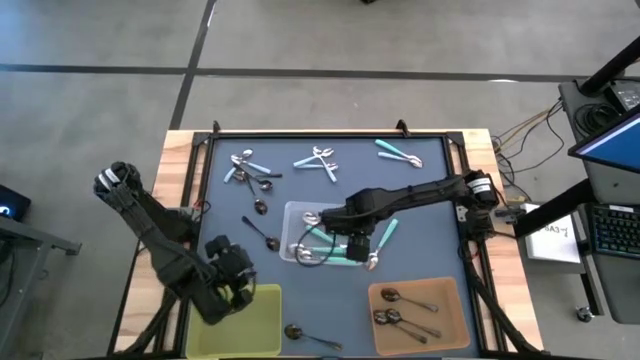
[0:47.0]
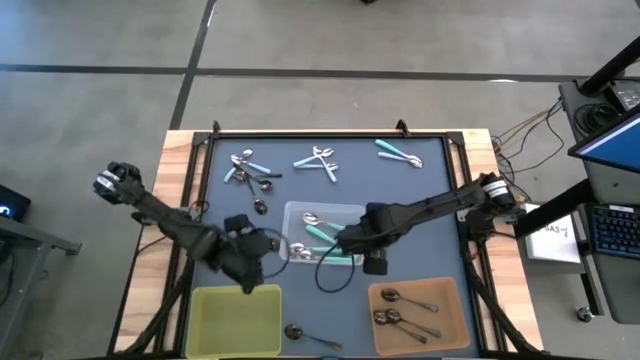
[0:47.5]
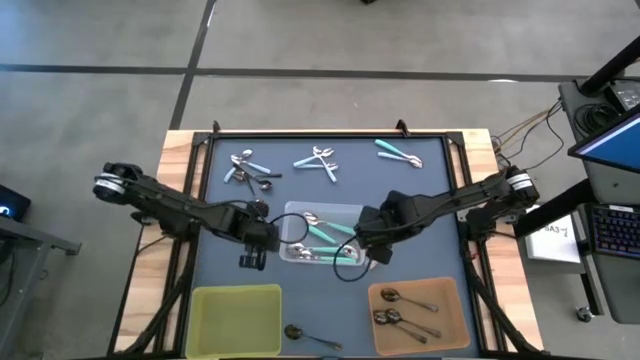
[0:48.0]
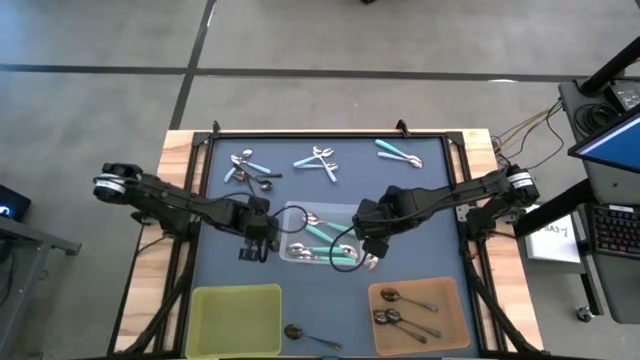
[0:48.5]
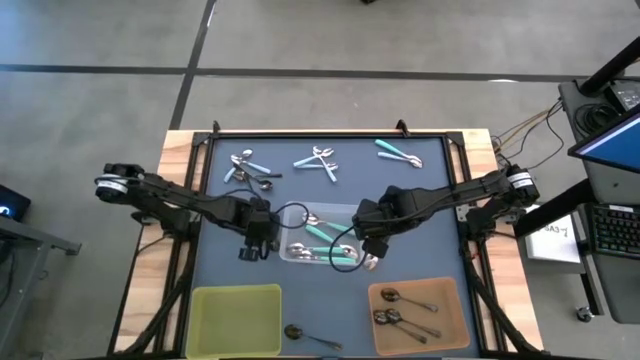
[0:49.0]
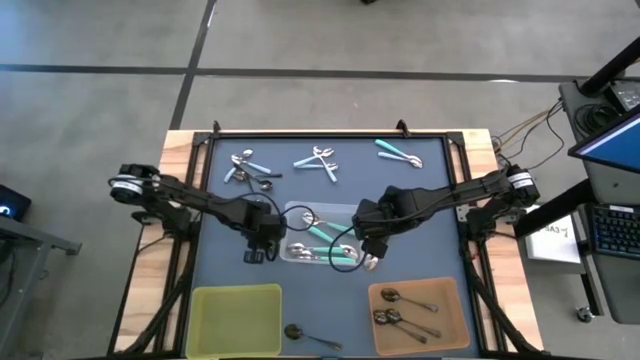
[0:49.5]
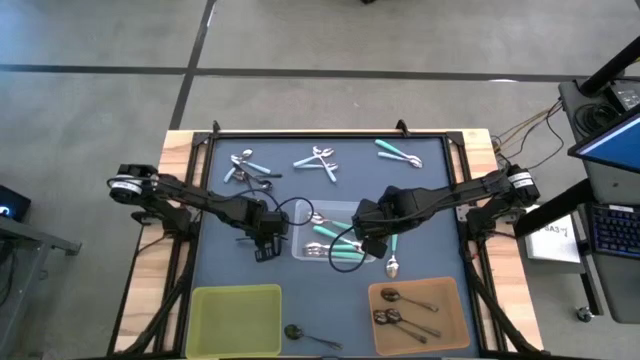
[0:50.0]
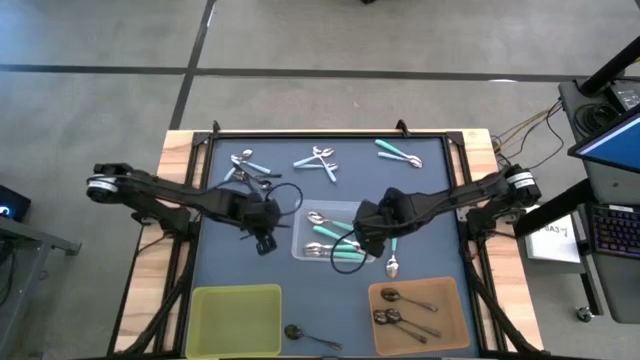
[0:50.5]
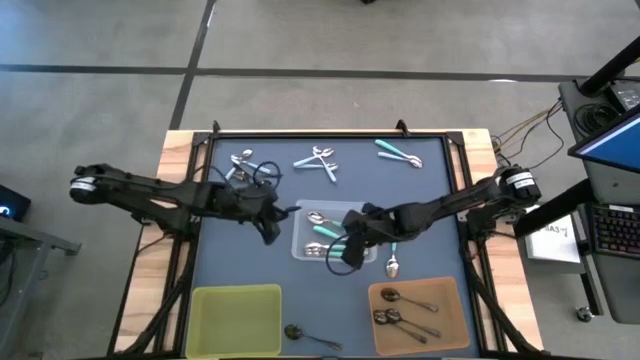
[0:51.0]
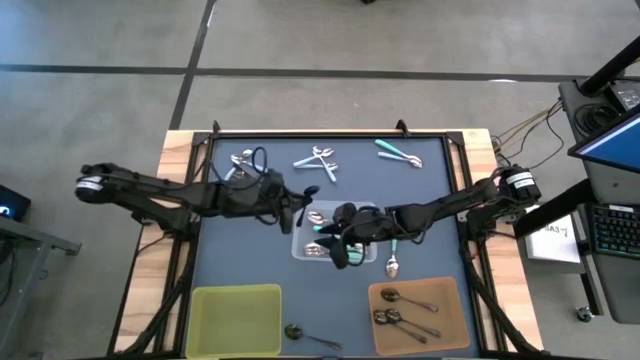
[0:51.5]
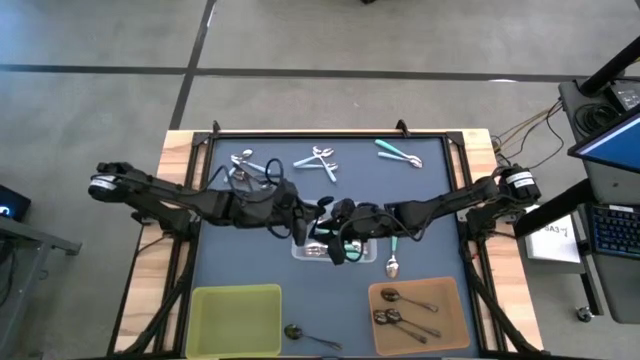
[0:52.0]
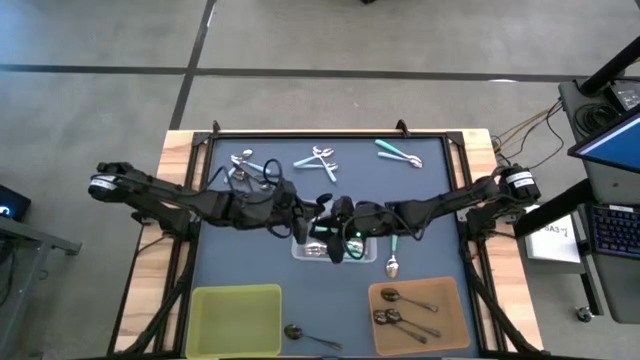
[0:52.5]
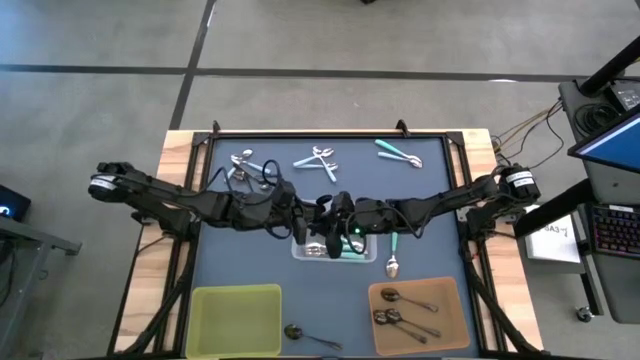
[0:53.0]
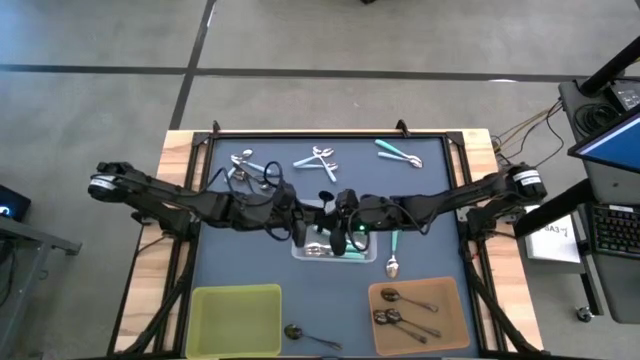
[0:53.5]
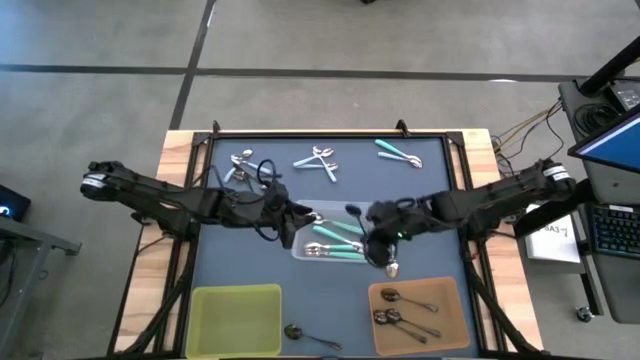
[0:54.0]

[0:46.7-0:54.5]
Task: Sort silverware by color (type)
Put the black spoon into the orange bin

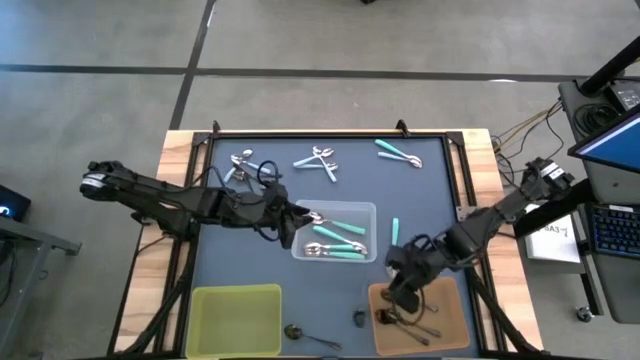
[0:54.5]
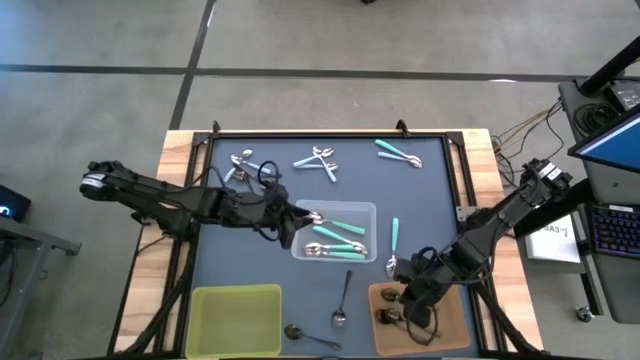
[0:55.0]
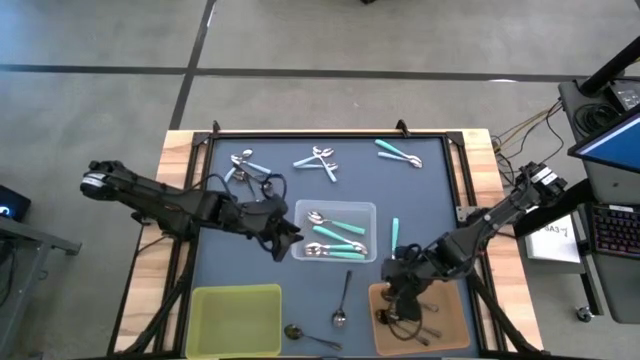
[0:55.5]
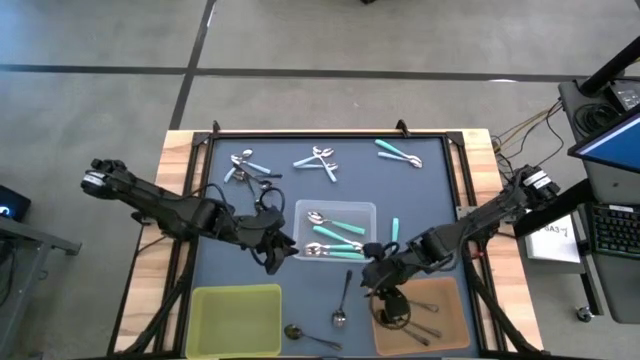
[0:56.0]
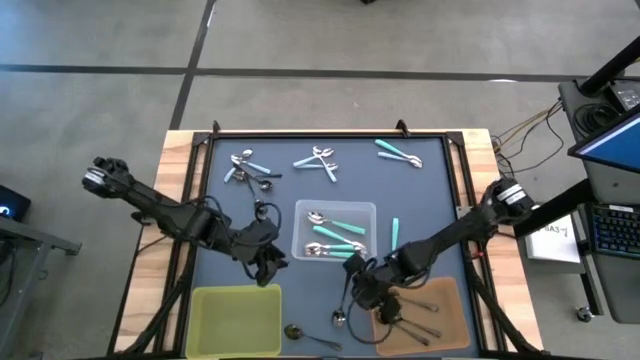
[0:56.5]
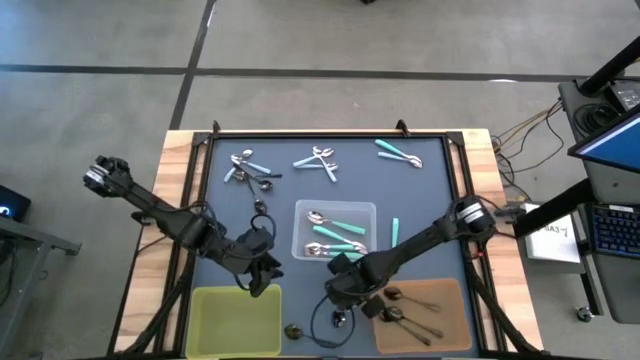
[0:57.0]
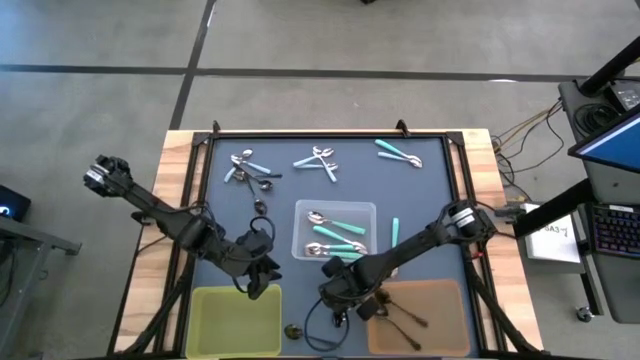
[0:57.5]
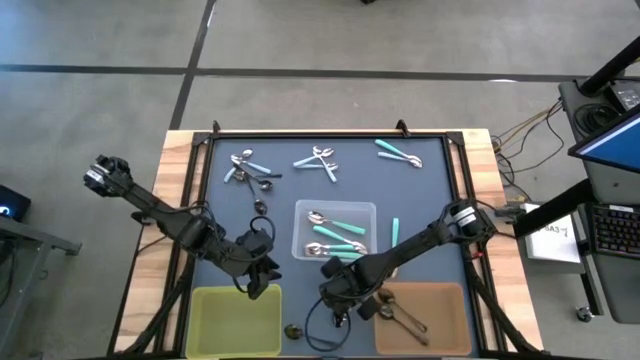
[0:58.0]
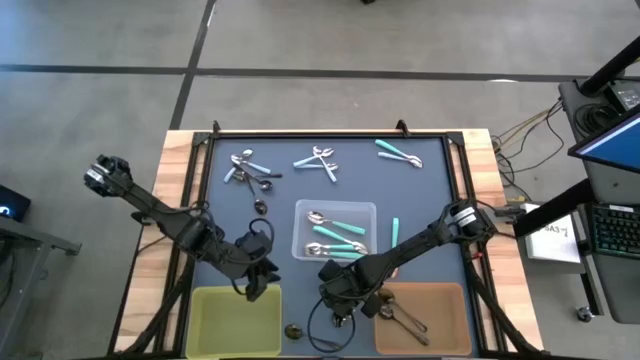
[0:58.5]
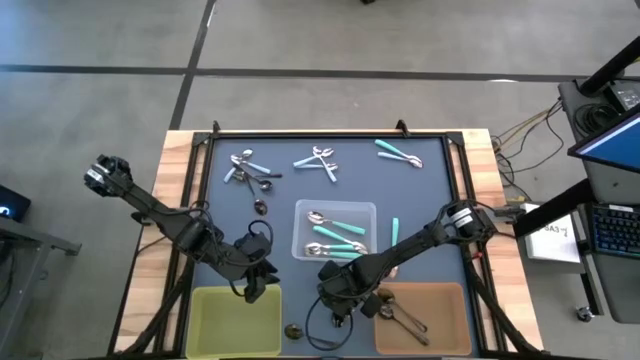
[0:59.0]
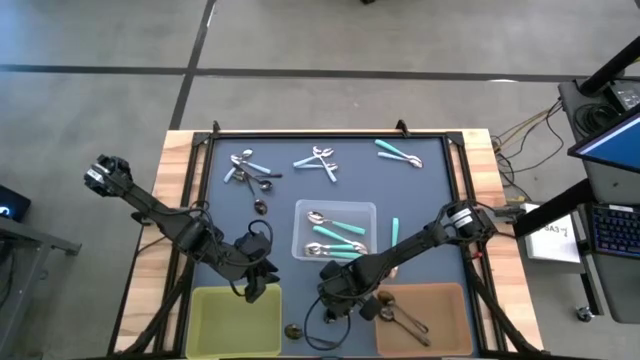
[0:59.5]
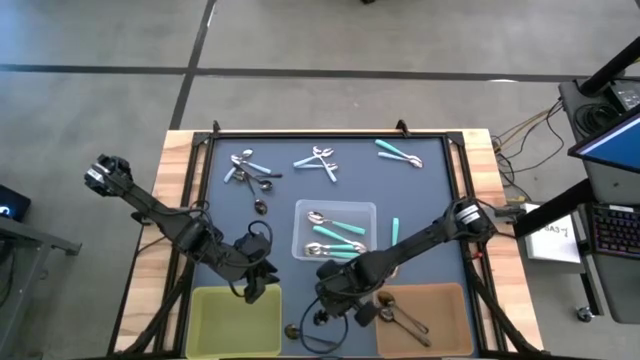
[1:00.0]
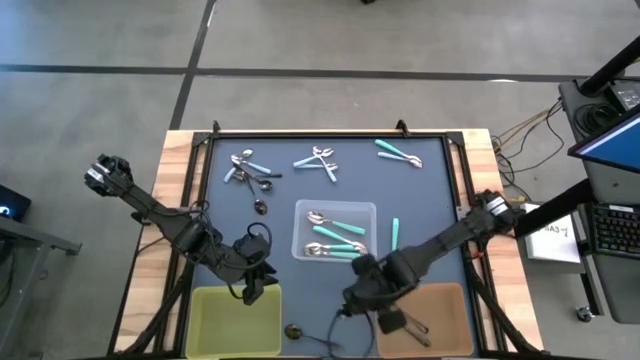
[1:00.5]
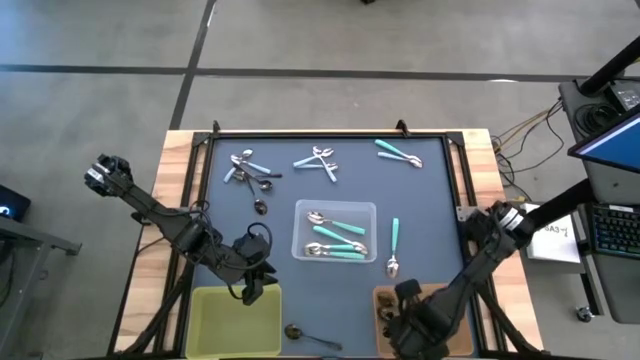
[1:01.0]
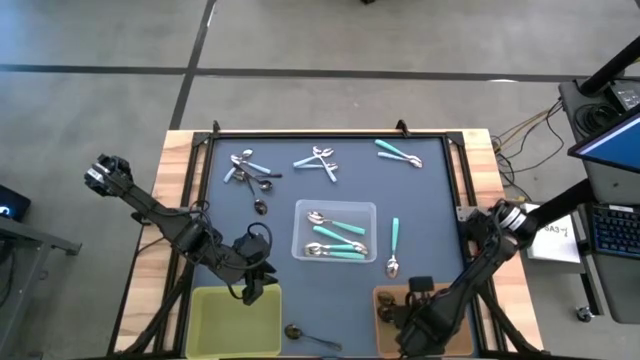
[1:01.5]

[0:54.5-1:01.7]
Put the black spoon into the orange bin

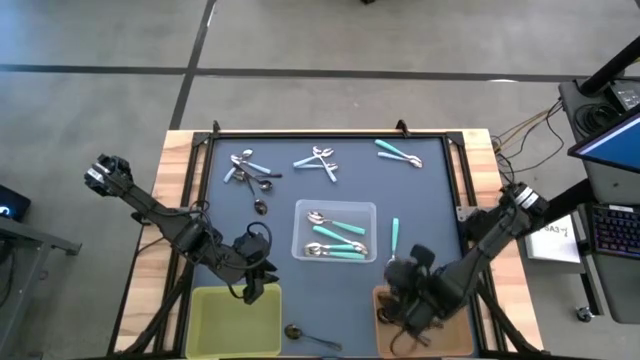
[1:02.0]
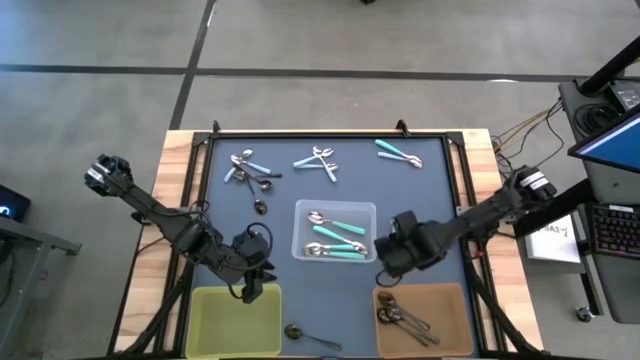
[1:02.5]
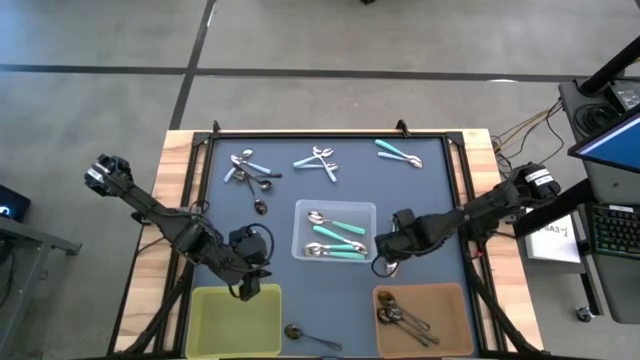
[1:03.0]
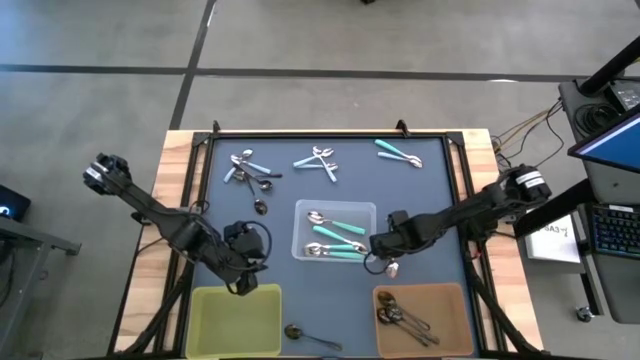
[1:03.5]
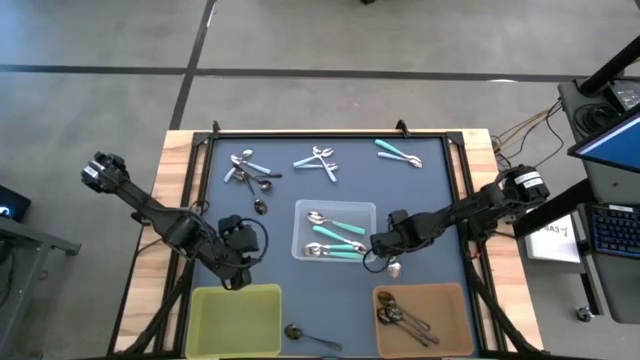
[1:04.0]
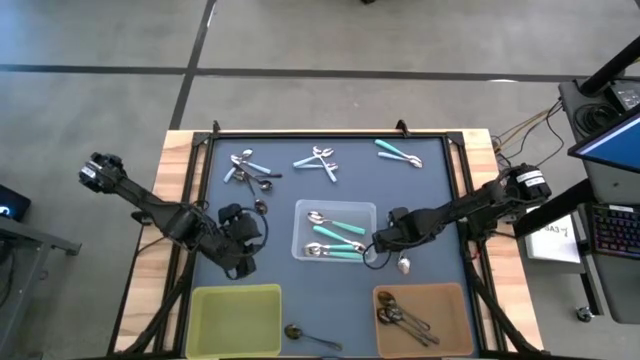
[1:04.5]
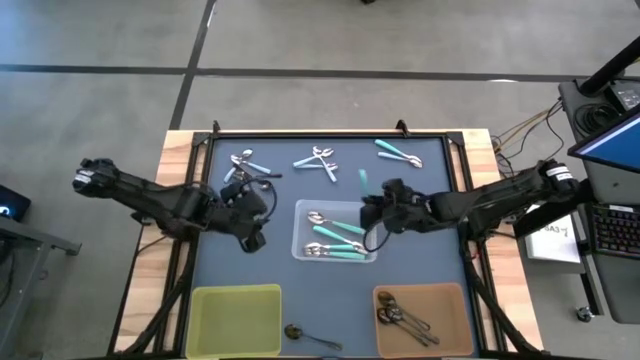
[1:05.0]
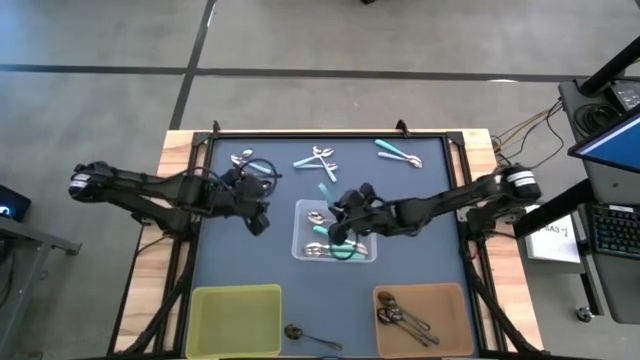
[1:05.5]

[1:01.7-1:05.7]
Put the green spoon into the transparent bin

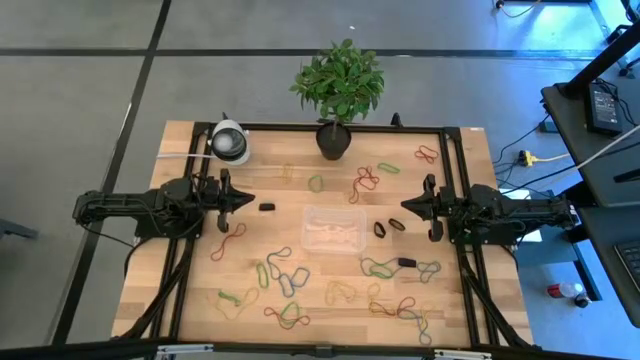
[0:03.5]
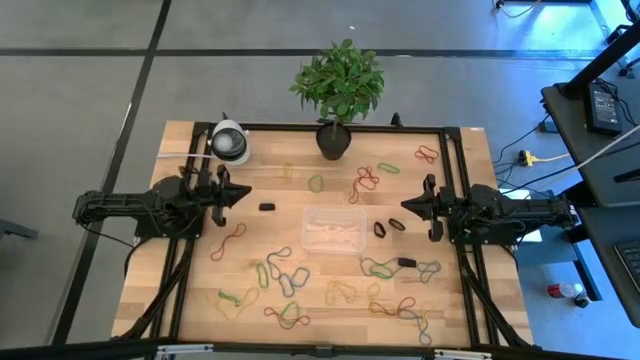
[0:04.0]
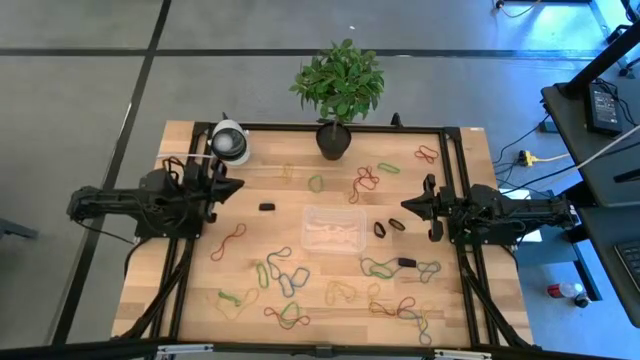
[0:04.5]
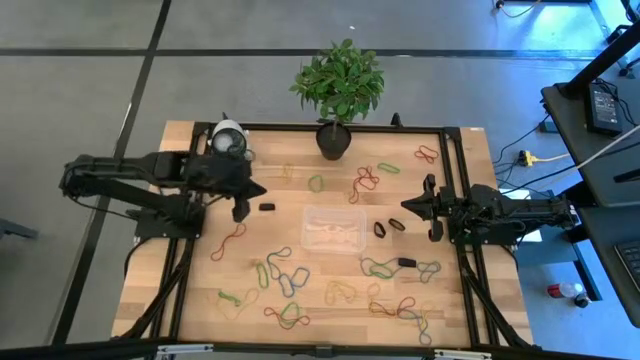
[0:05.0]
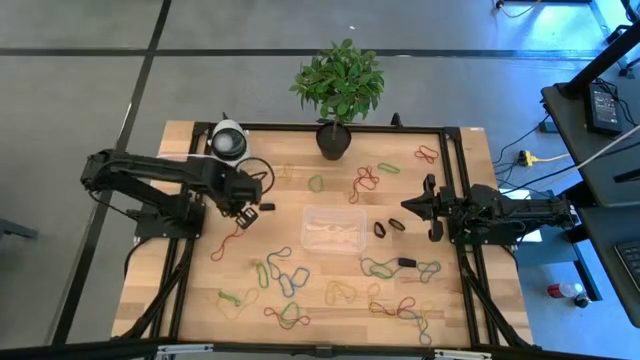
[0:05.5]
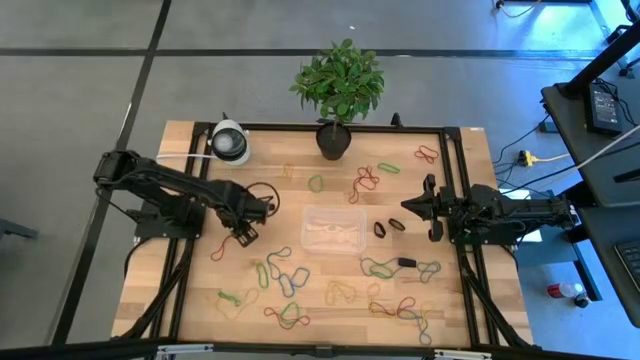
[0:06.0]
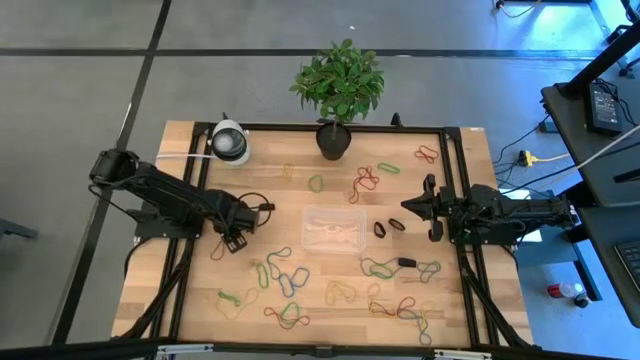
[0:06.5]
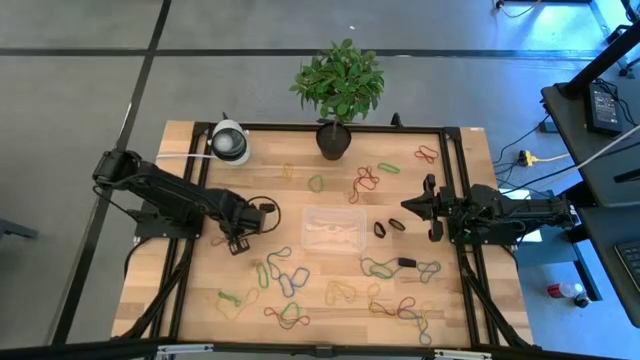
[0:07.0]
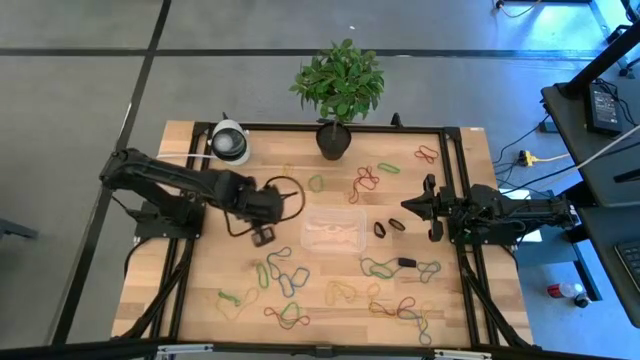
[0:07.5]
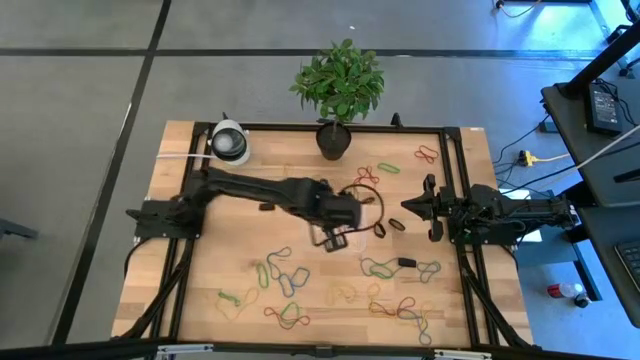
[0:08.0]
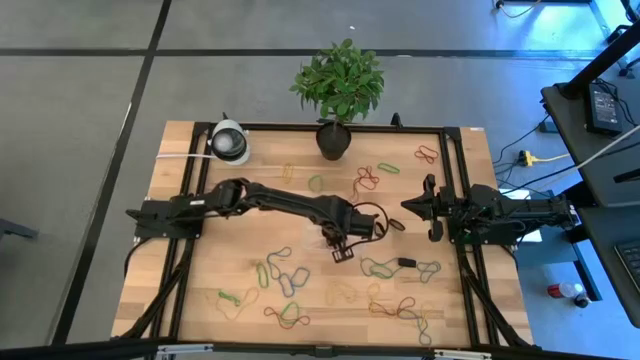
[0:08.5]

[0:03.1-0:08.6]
Task: Pick and place rubber bands into bin
Put the red rubber band into the bin
